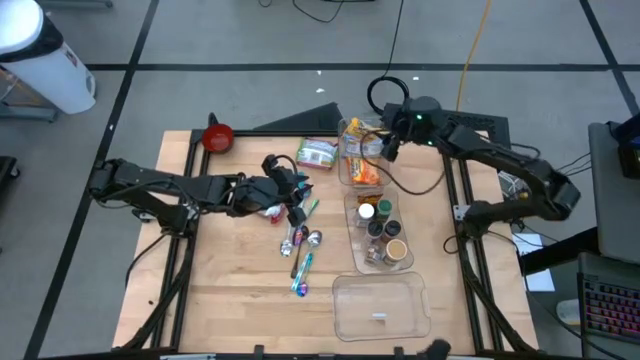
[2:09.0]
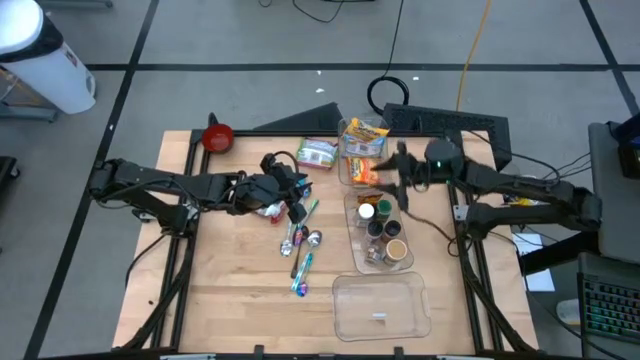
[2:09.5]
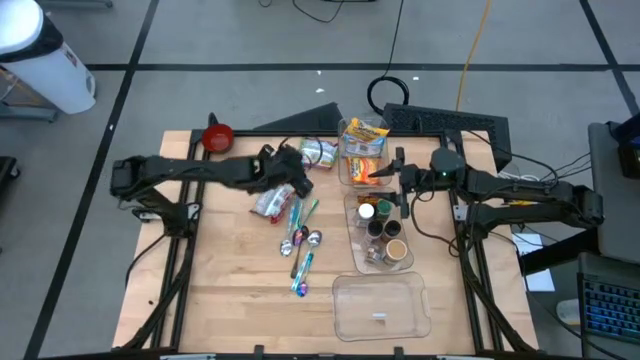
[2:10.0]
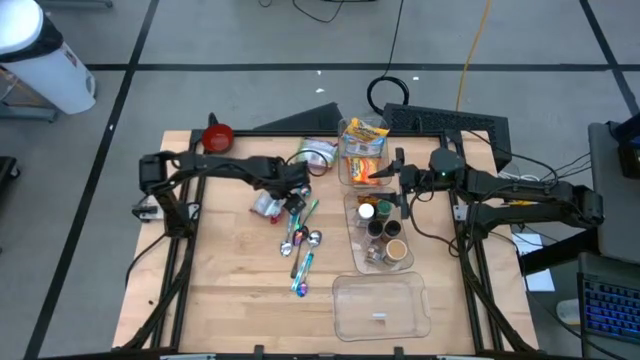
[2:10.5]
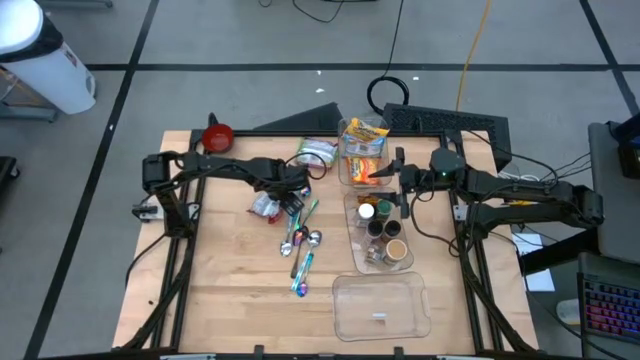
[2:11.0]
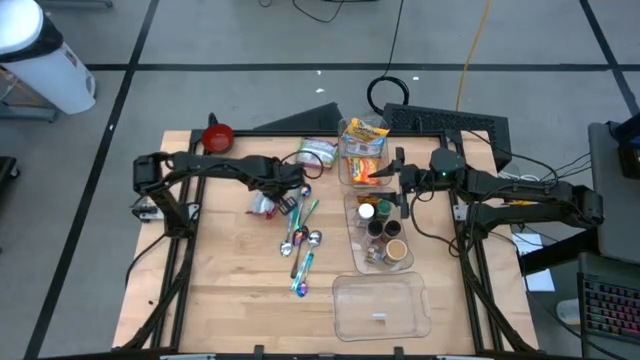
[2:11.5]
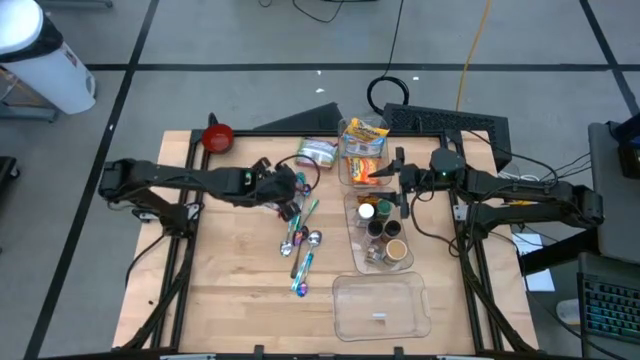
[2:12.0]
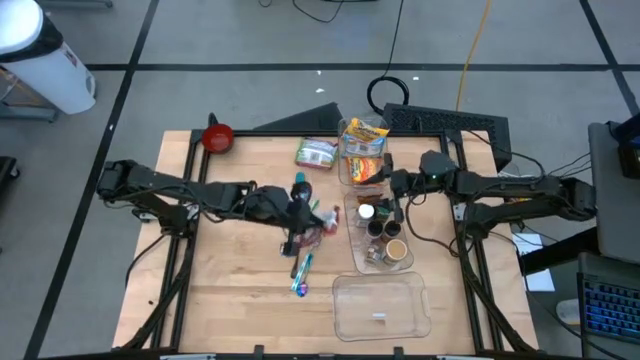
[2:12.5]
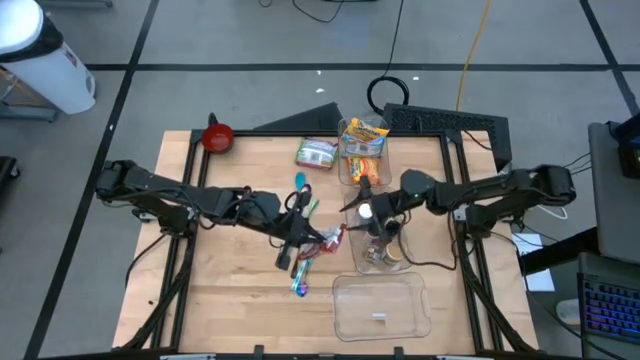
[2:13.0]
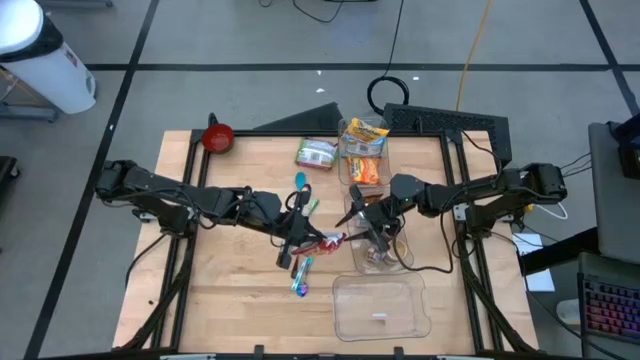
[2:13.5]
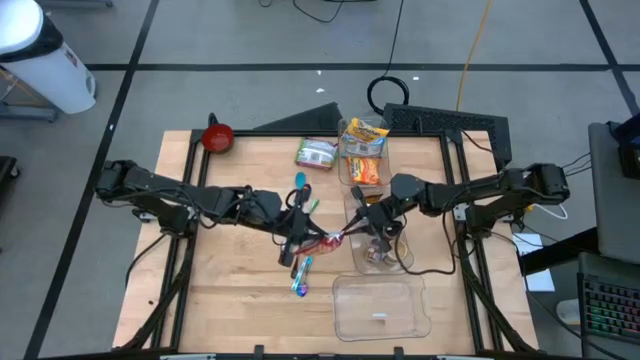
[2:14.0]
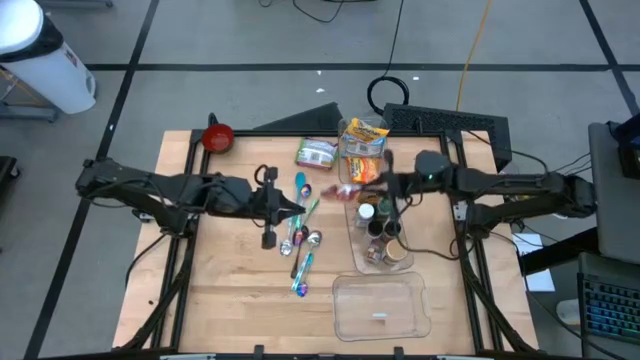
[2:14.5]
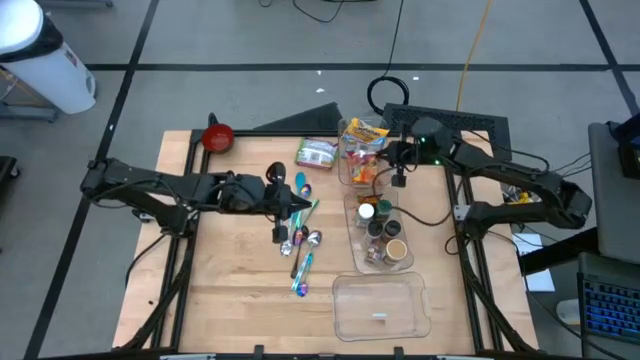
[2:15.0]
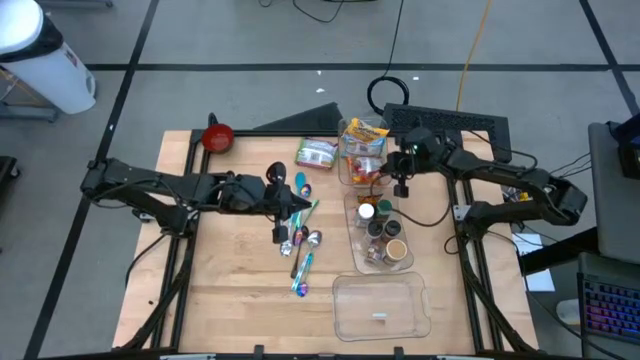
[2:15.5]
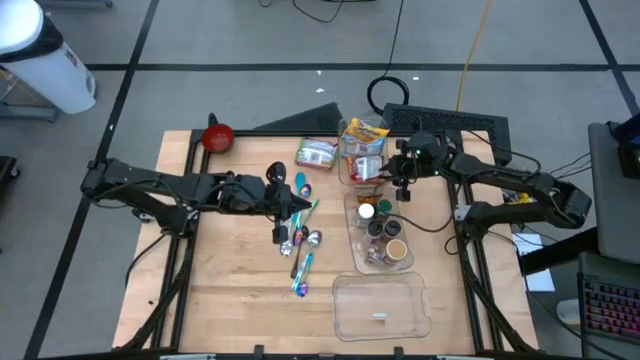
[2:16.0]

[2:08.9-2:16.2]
Task: Pick & Place Food Item
Put the red noodle pack into the top transparent bin

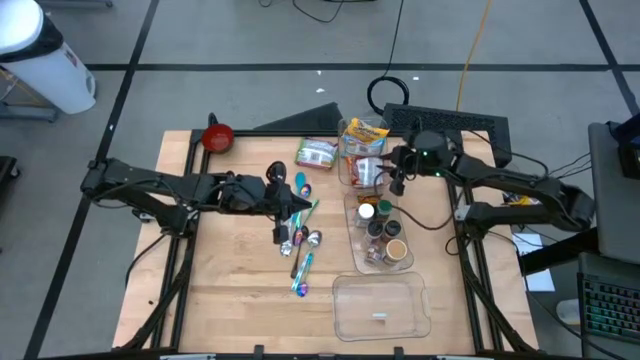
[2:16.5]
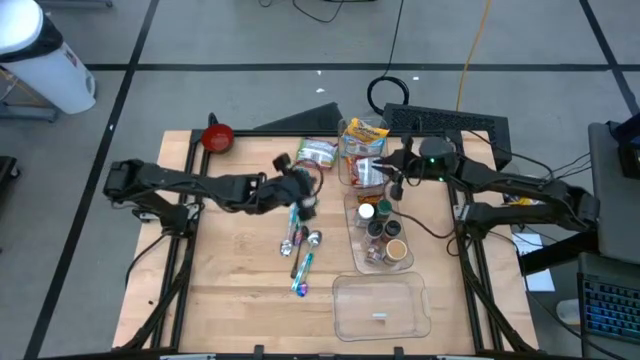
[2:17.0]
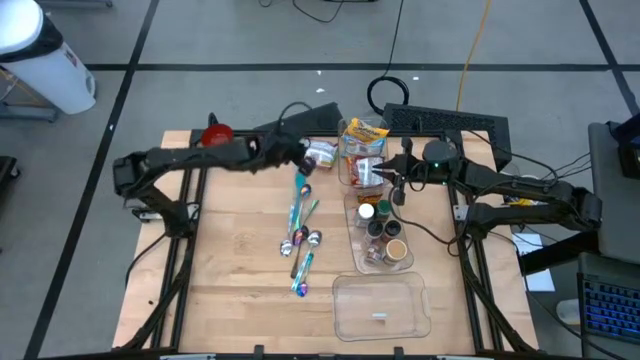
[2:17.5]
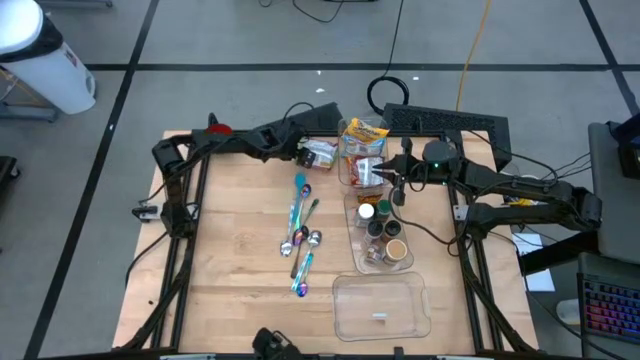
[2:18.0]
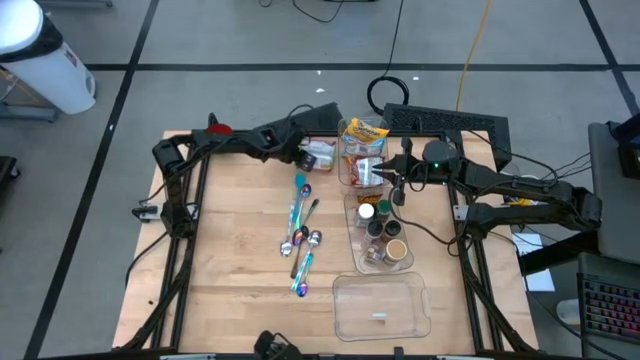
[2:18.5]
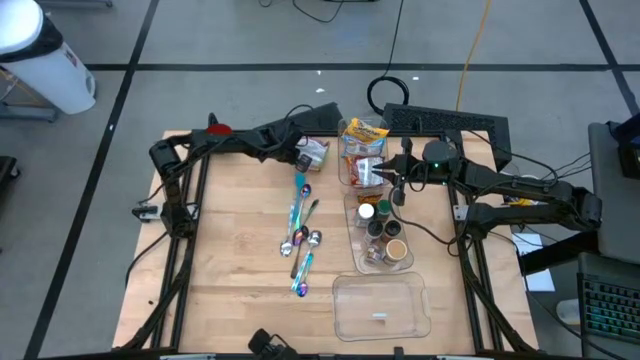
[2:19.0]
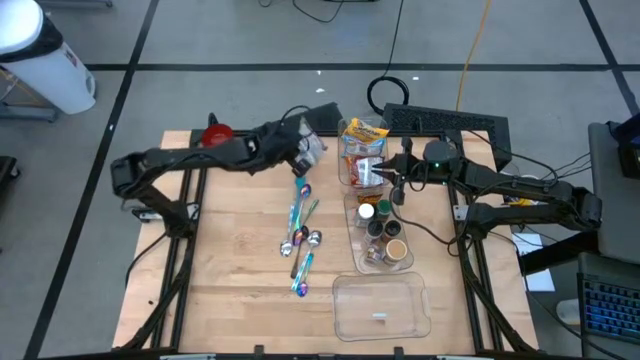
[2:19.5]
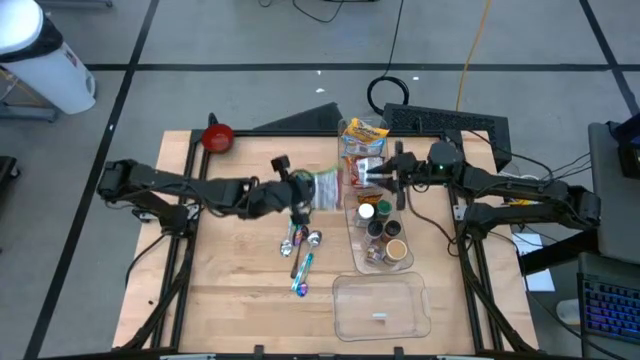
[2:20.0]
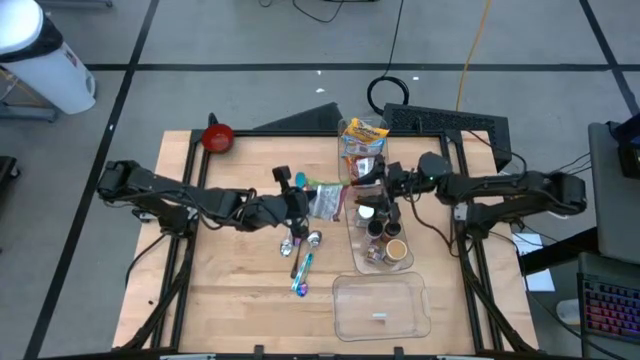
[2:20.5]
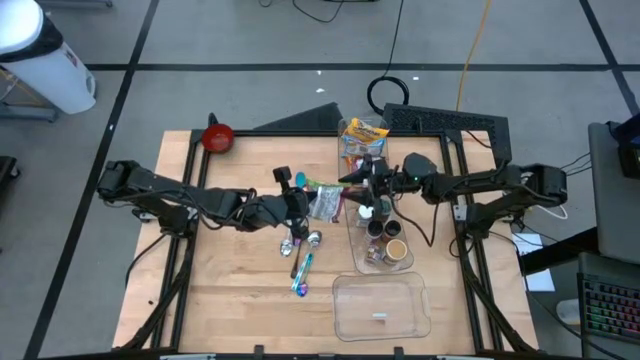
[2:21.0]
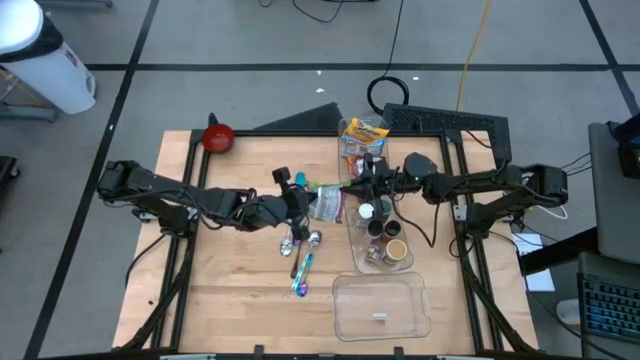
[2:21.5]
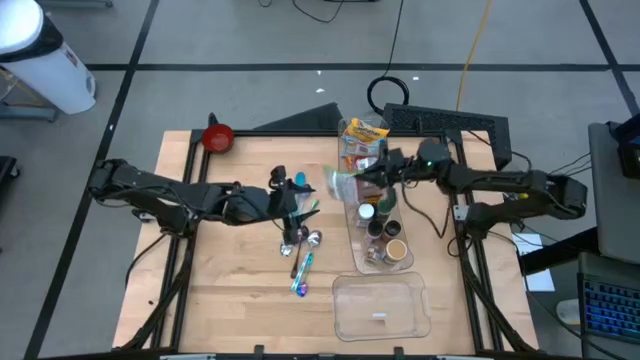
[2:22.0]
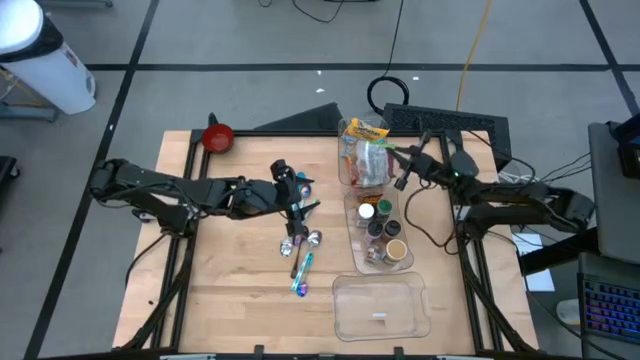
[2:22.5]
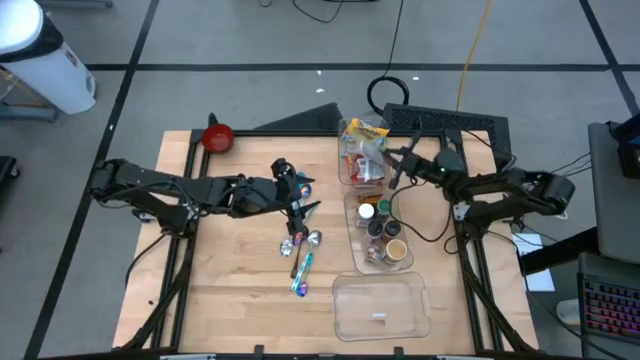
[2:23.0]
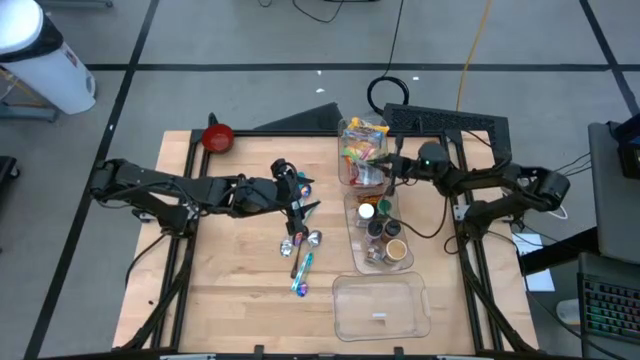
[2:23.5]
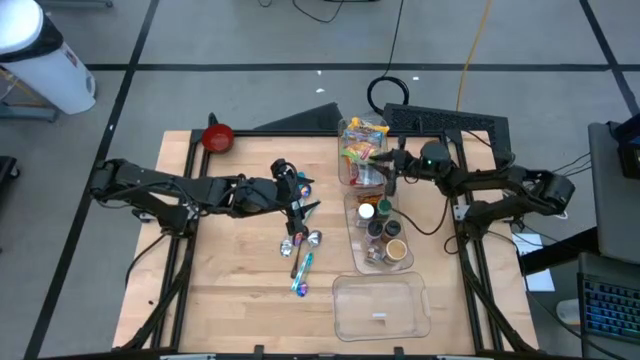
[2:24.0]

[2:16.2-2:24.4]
Put the green noodle pack into the top transparent bin

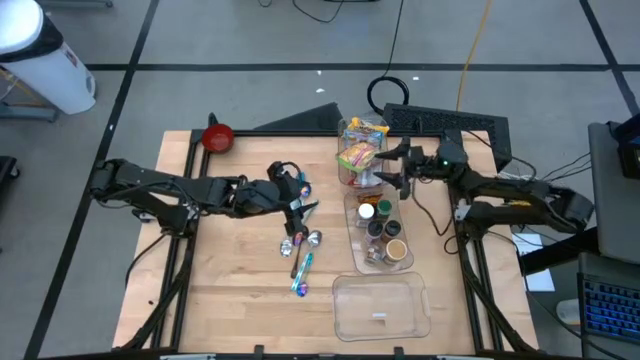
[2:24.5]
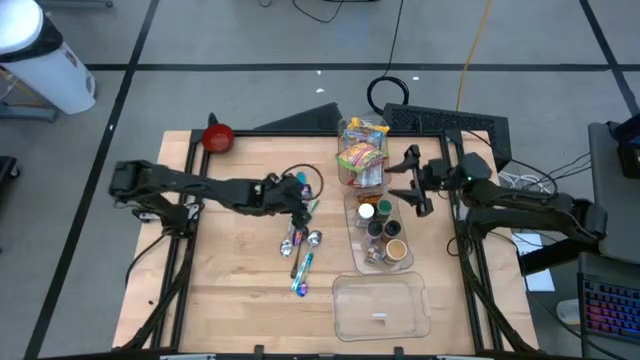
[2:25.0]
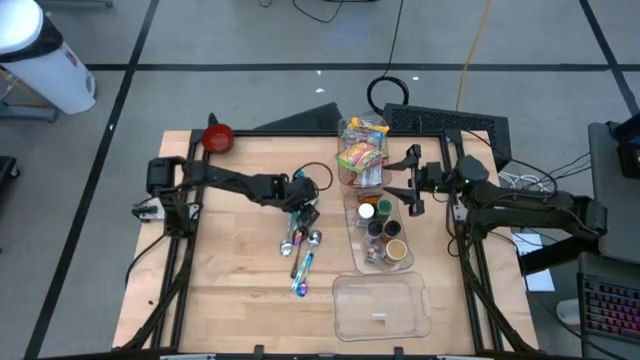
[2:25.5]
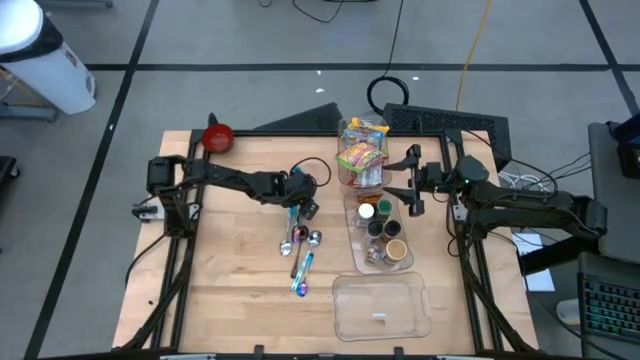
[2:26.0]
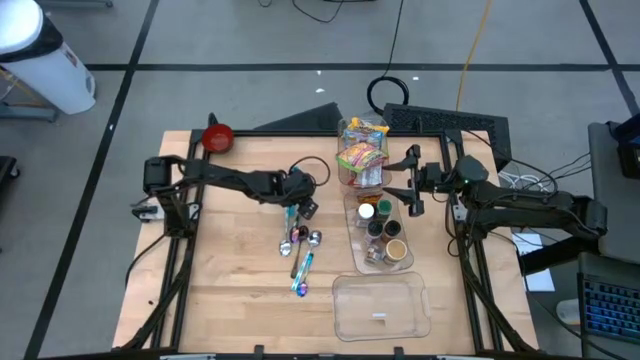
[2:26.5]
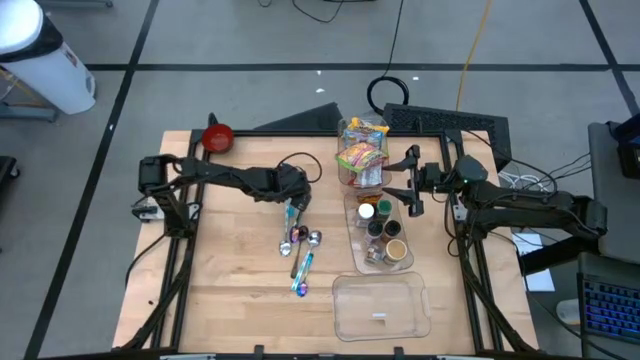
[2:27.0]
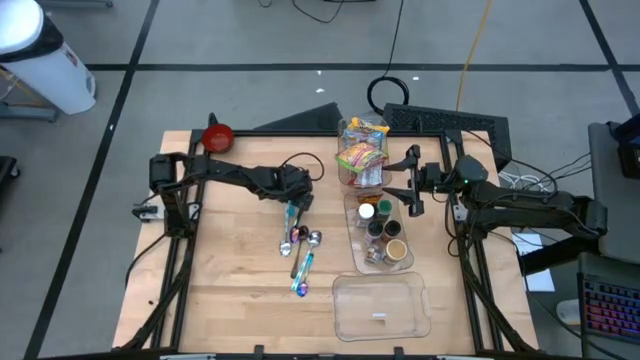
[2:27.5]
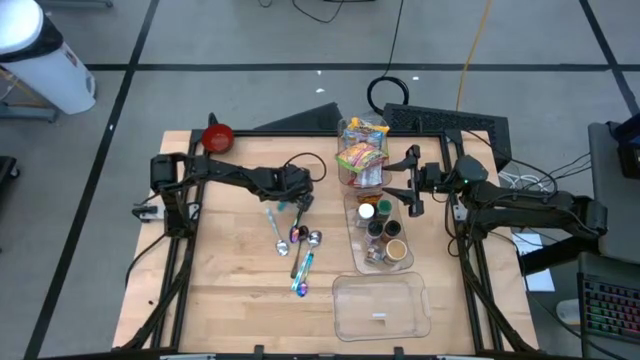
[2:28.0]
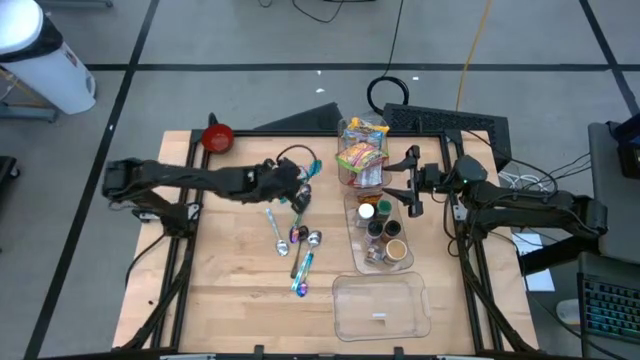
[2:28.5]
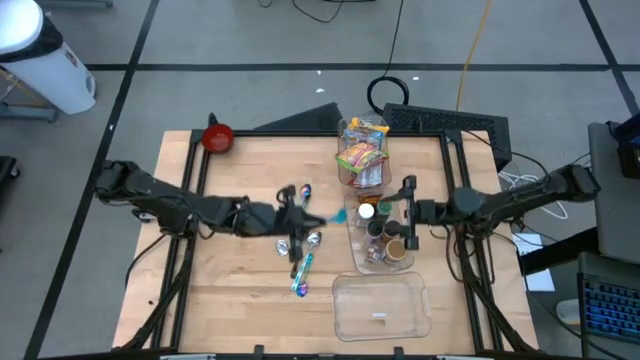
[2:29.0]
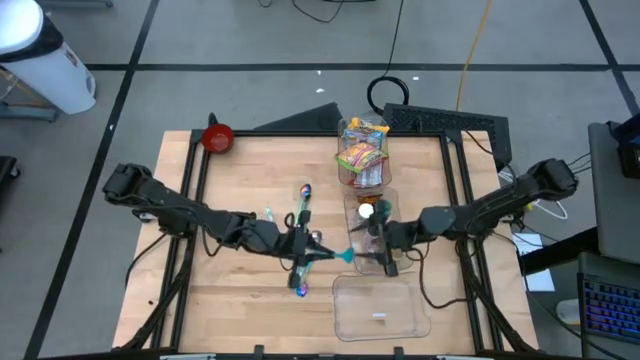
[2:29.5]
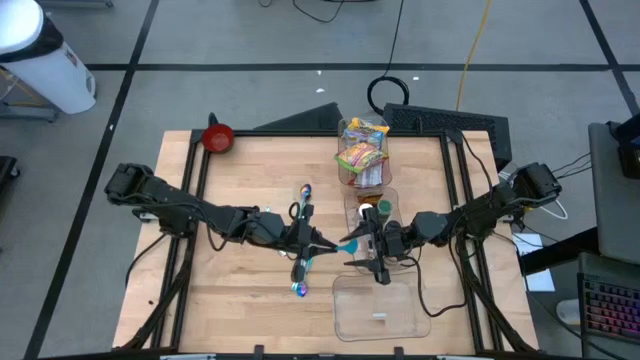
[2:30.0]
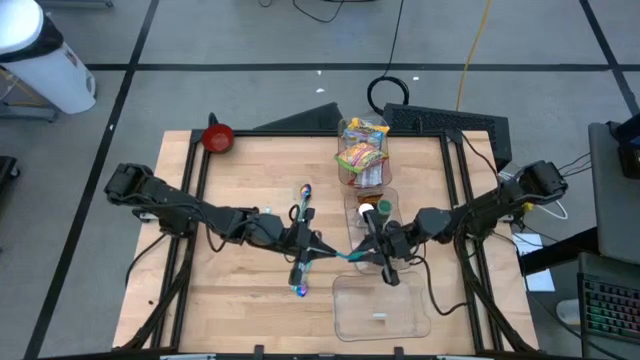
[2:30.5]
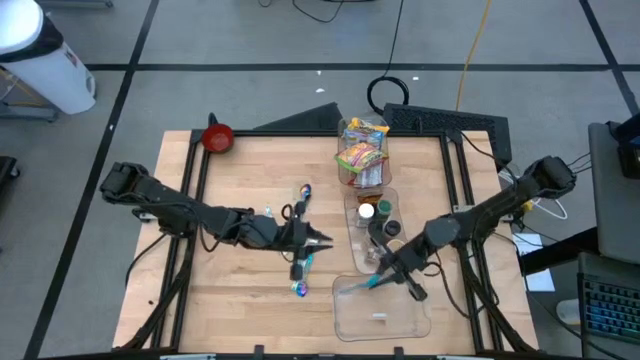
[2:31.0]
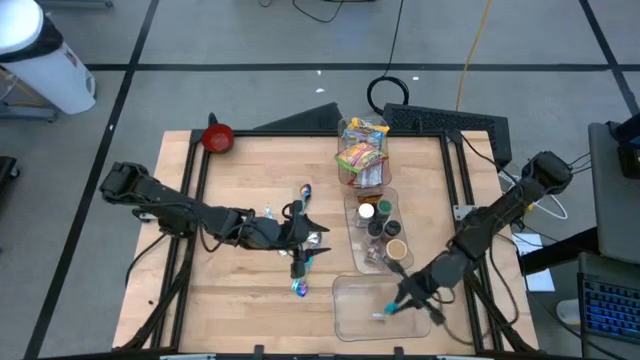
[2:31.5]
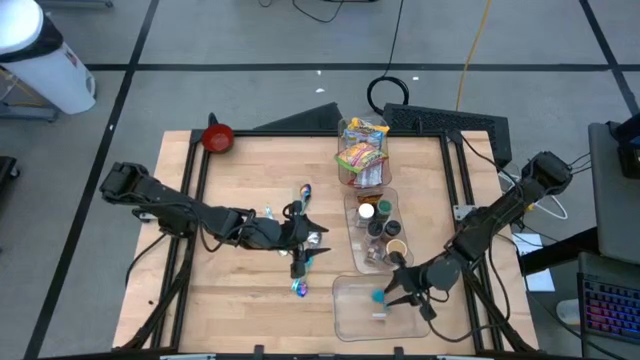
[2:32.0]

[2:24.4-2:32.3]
Put the blue spoon into the bottom transparent bin
